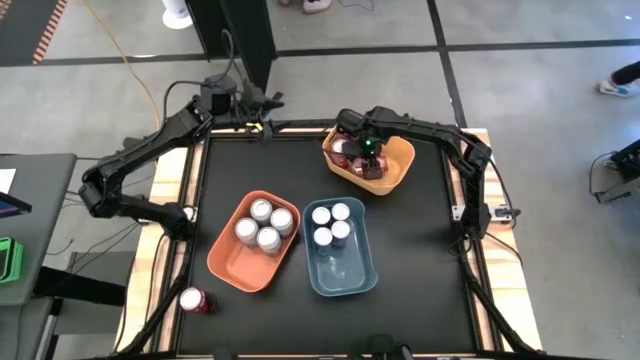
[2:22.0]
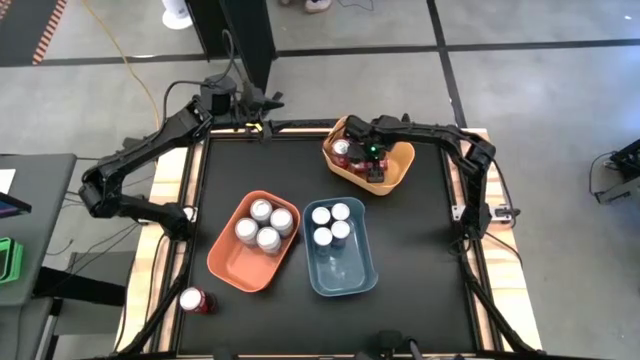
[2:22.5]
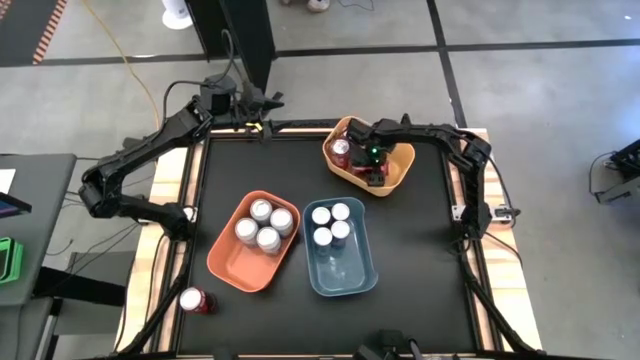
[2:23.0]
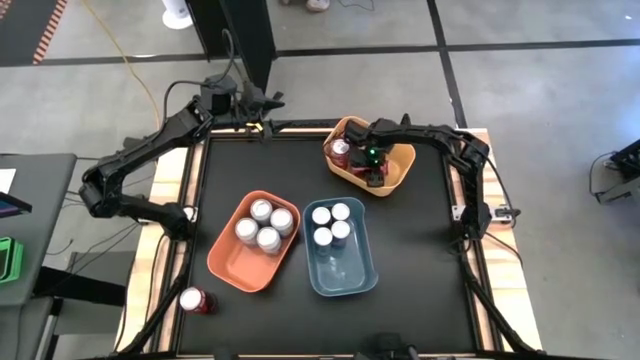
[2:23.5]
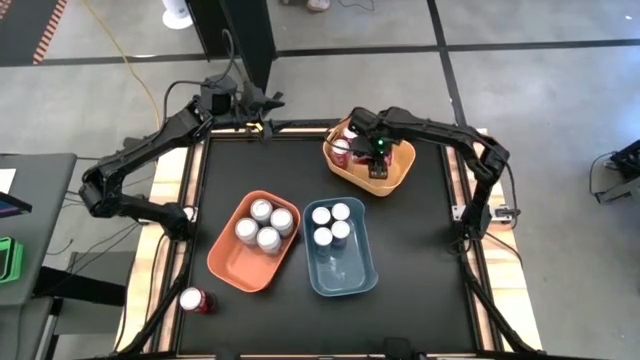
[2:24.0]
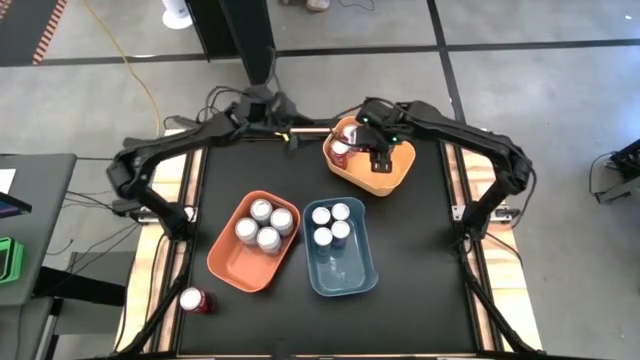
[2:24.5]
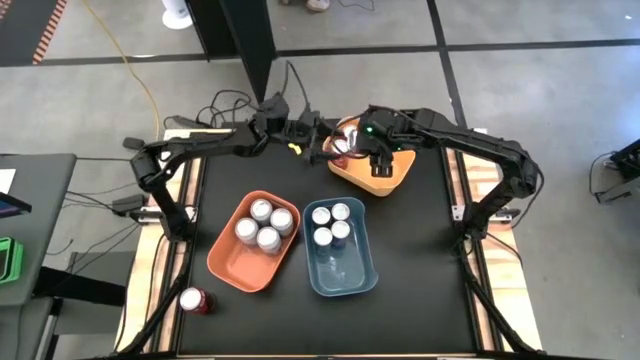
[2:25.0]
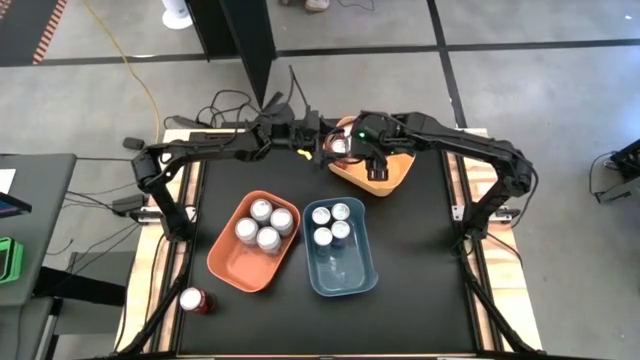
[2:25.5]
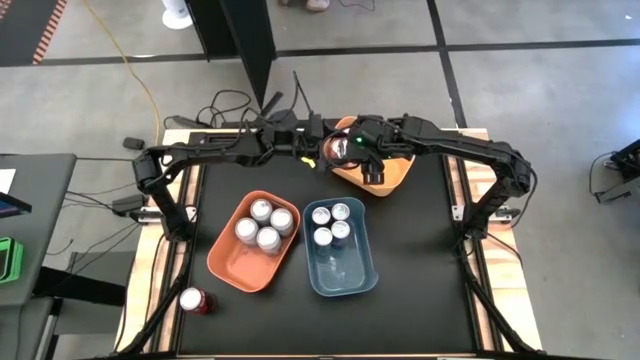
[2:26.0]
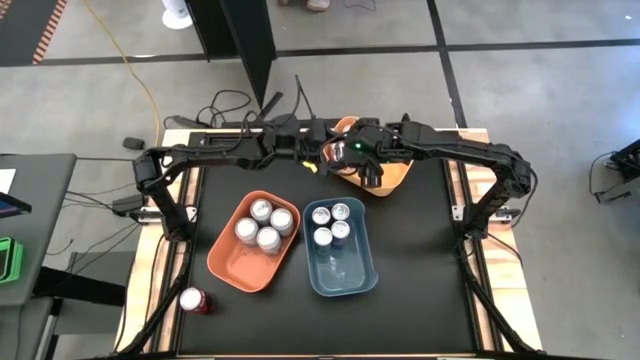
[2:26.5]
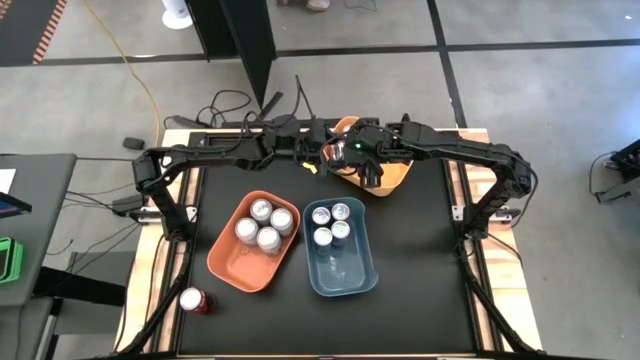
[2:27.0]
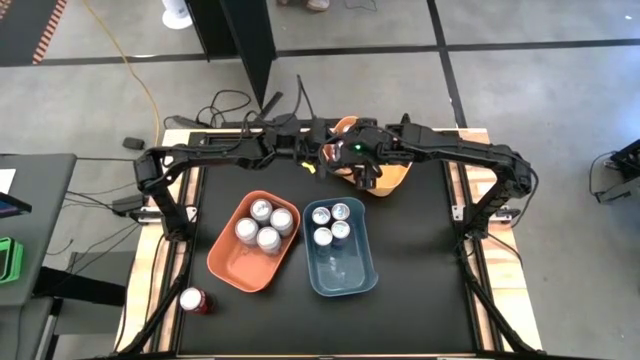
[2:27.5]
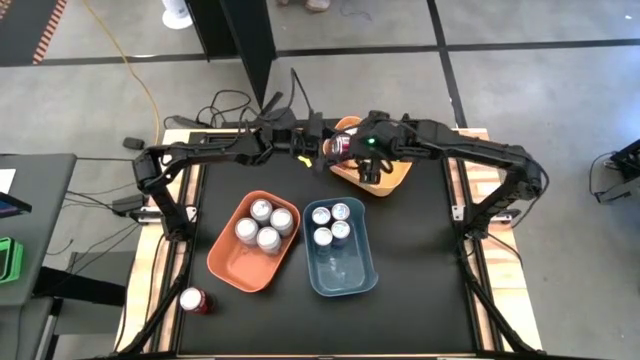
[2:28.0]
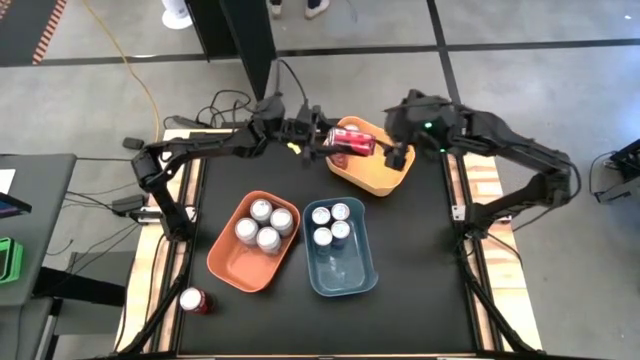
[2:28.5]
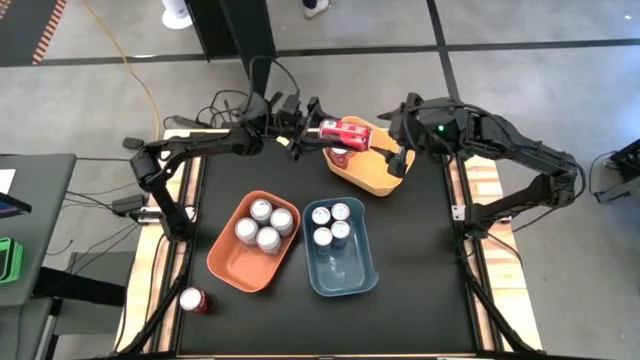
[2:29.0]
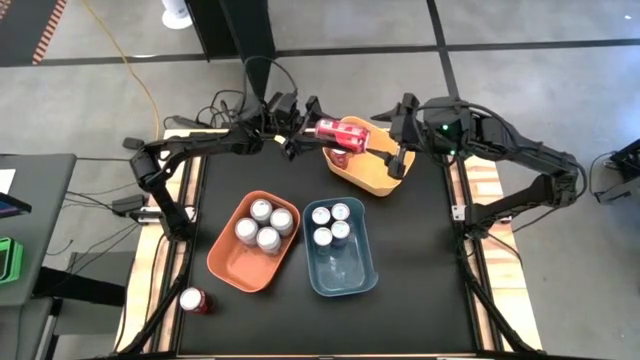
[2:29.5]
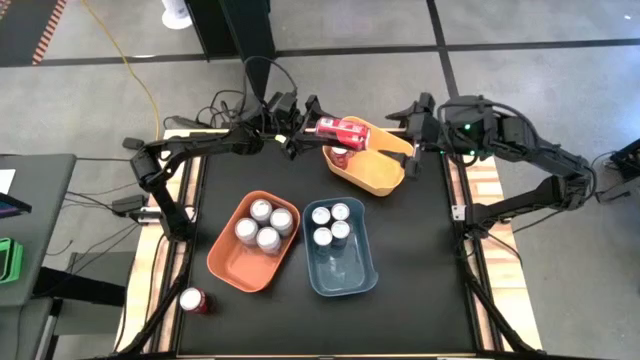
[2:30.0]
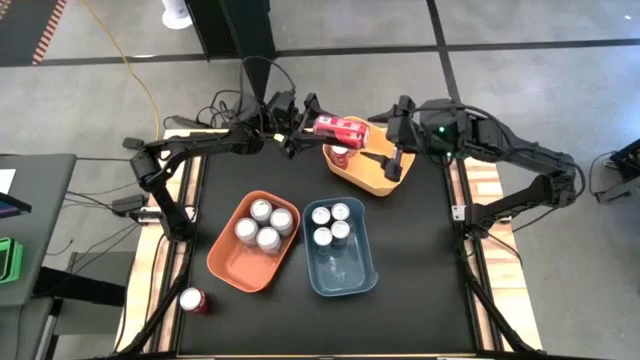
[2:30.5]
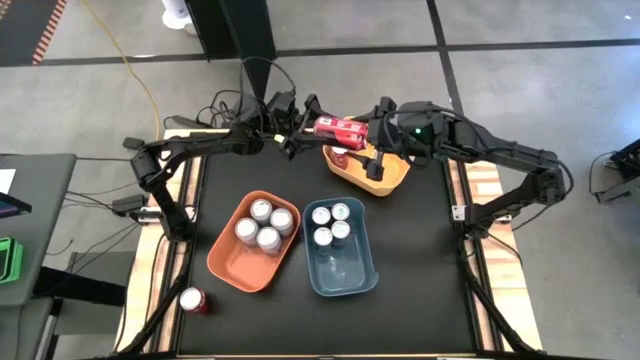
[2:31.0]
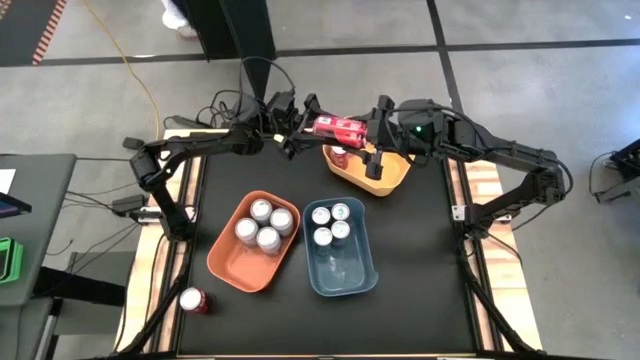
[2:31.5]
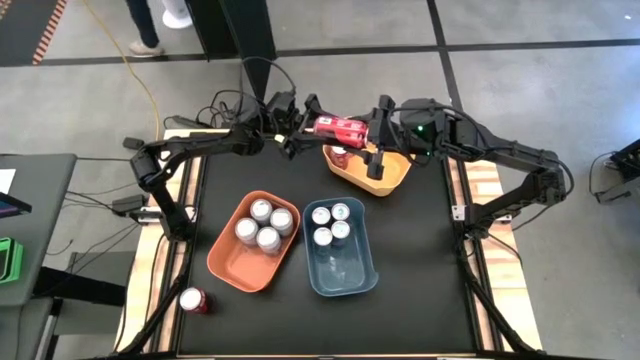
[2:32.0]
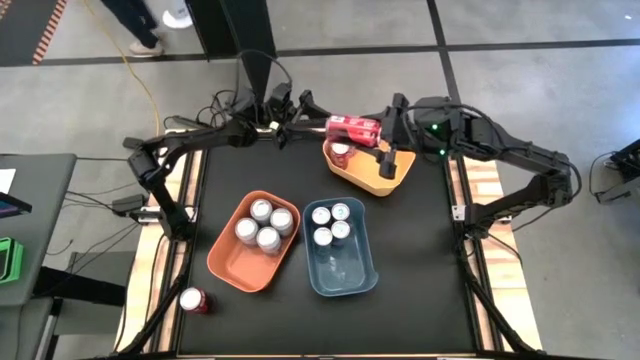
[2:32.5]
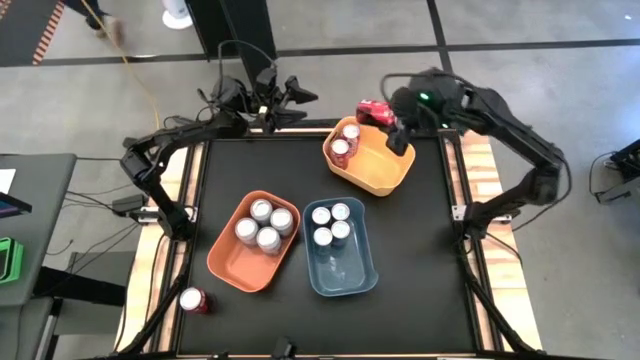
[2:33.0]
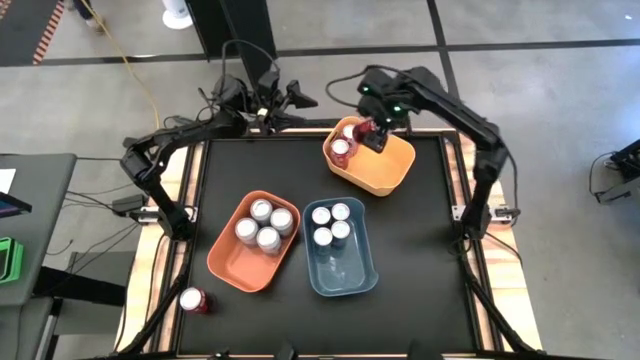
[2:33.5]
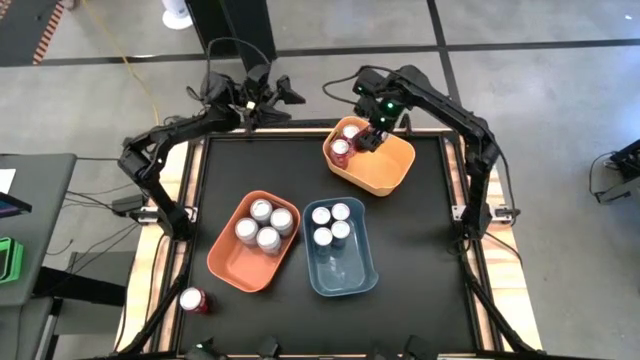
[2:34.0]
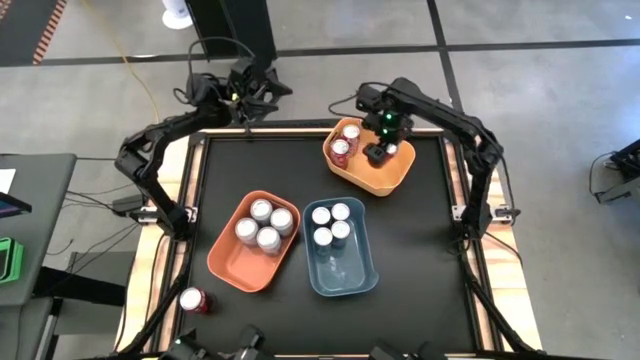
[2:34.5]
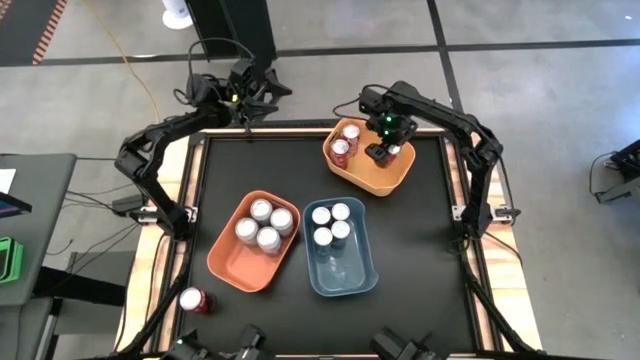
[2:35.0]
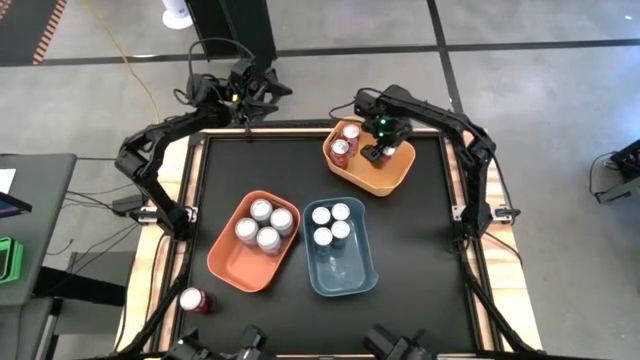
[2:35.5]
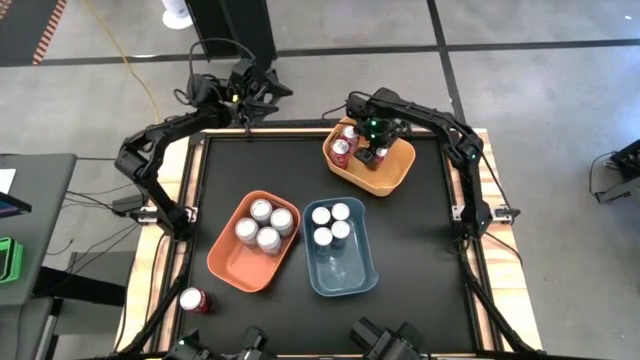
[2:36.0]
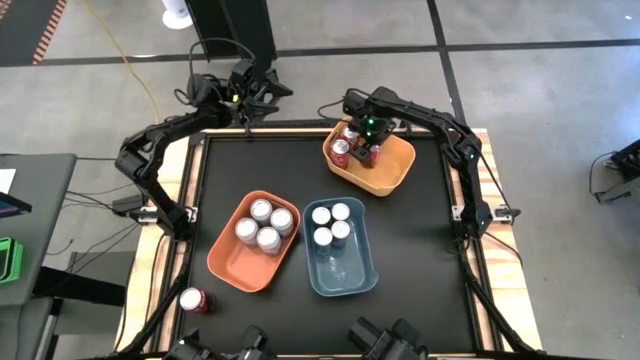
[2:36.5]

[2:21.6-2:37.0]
Task: Sort soda cans
Put the top red soda can into the yellow bin

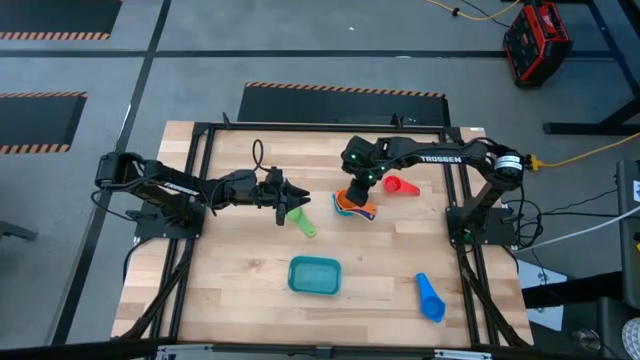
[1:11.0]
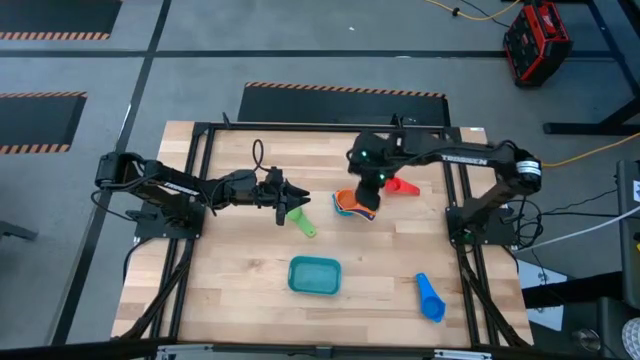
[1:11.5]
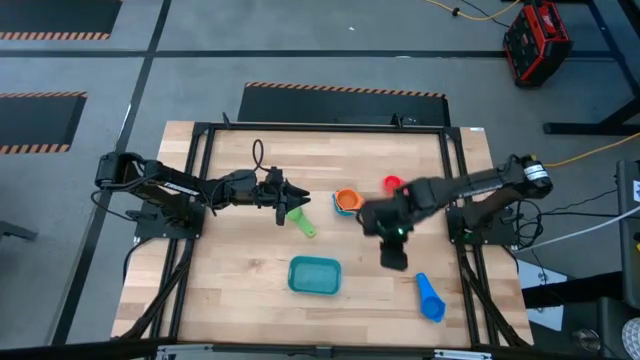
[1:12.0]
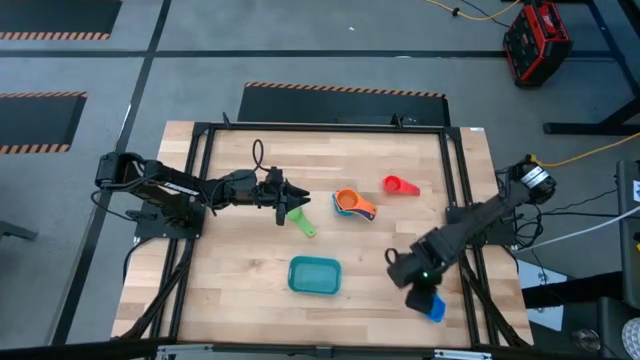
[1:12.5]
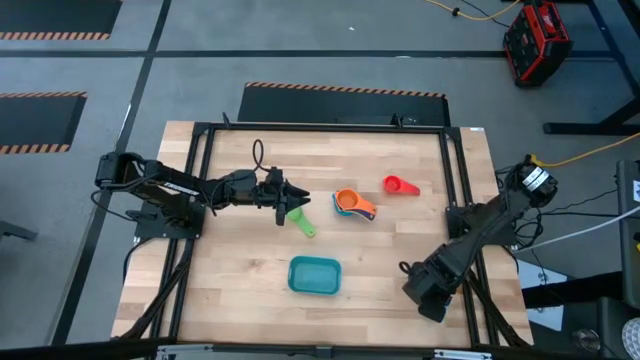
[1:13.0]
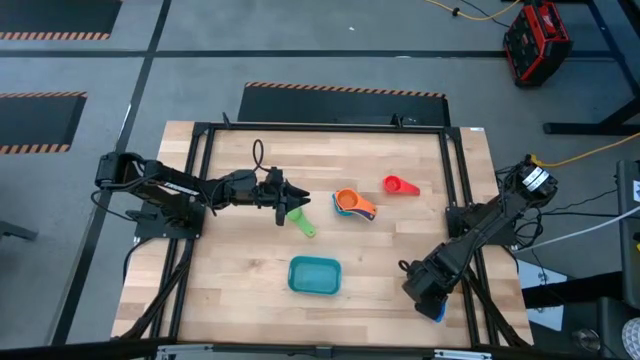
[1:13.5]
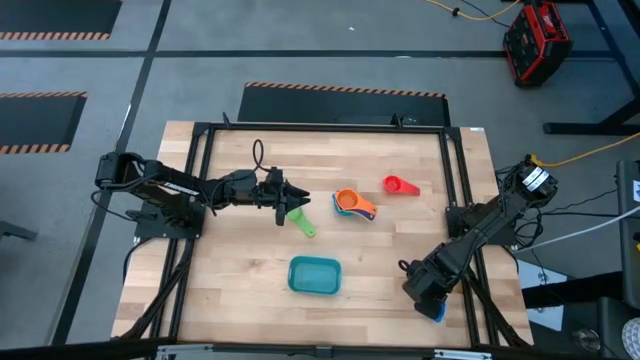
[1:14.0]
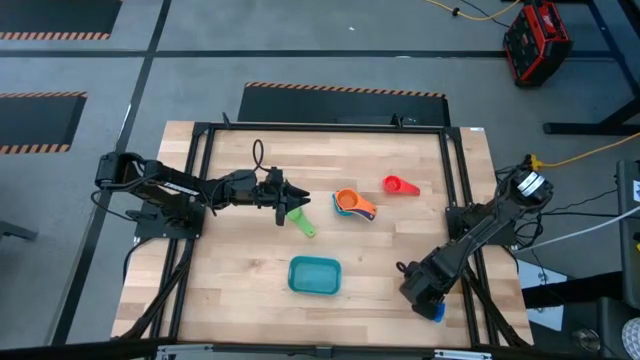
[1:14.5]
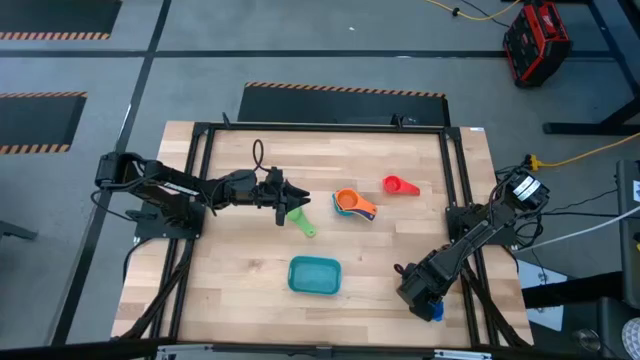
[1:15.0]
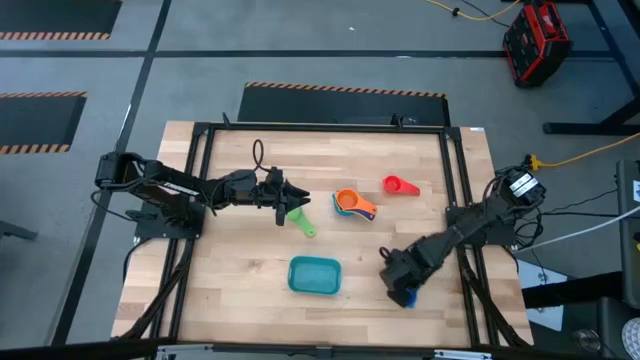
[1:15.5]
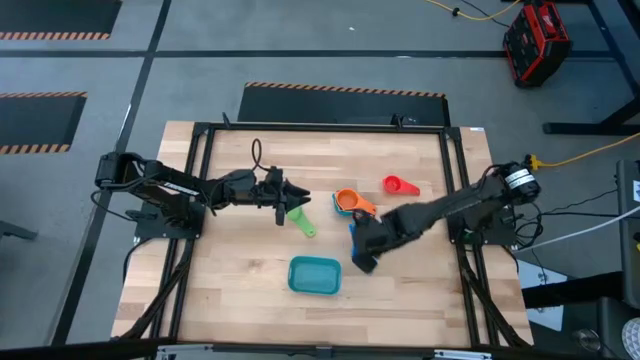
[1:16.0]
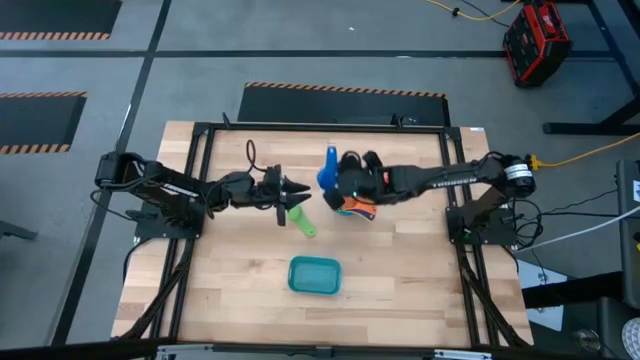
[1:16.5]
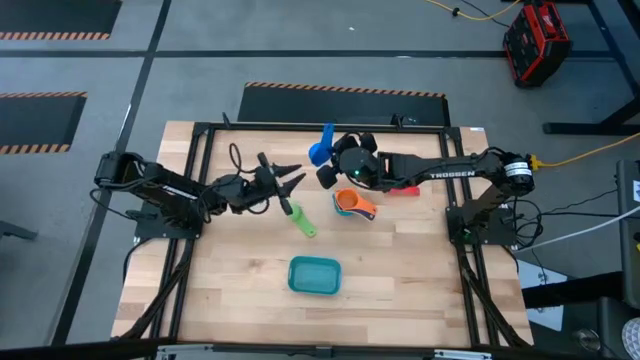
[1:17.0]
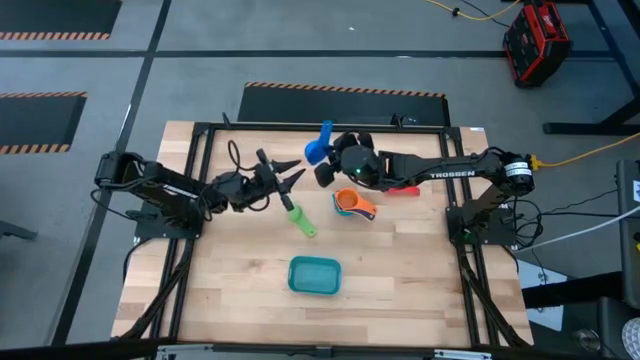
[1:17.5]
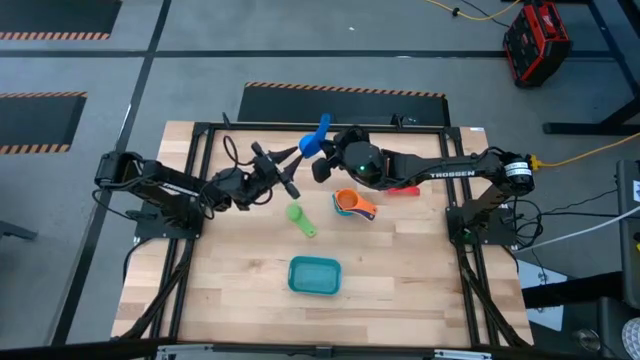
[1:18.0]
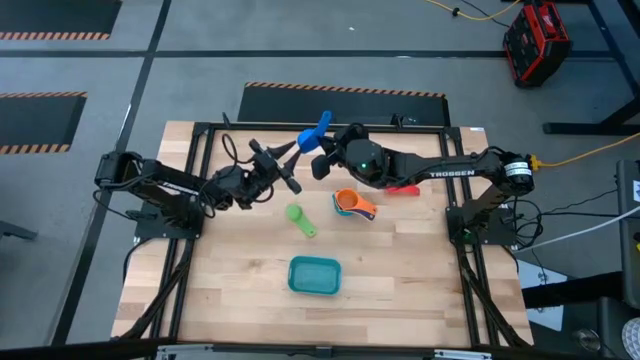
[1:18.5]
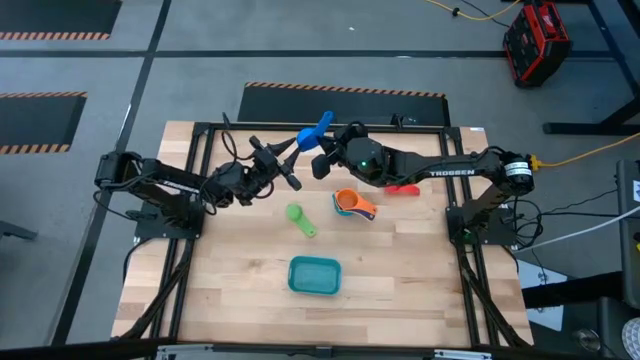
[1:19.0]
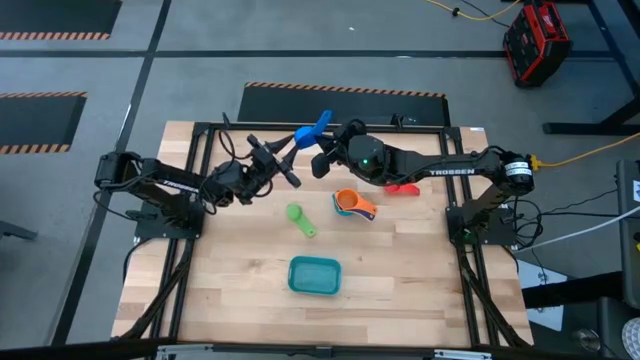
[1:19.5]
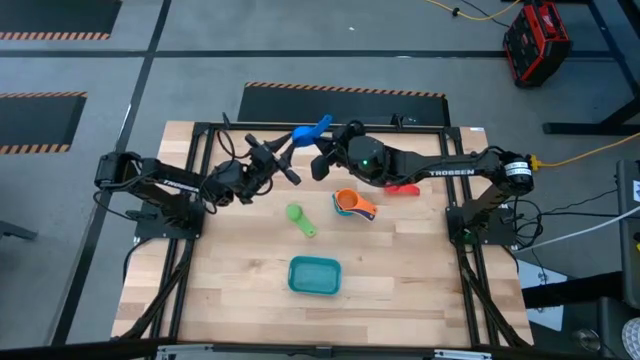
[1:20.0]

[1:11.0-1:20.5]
Task: Nest measuring cups in basket
Stack the blue measuring cup on top of the orange measuring cup
